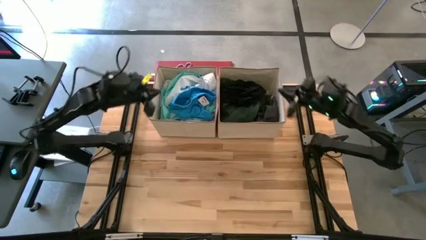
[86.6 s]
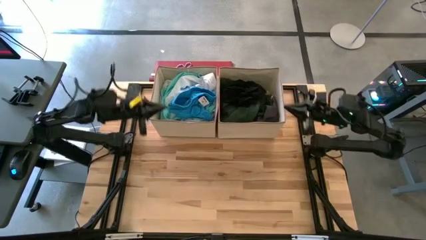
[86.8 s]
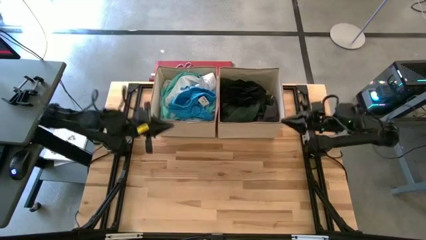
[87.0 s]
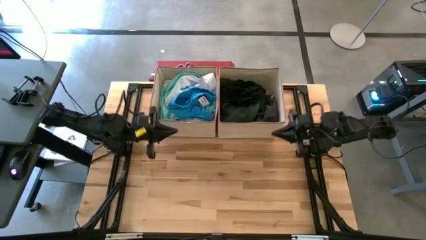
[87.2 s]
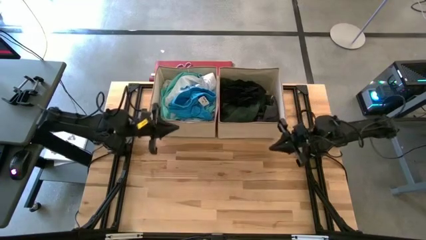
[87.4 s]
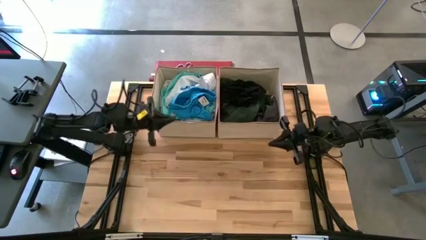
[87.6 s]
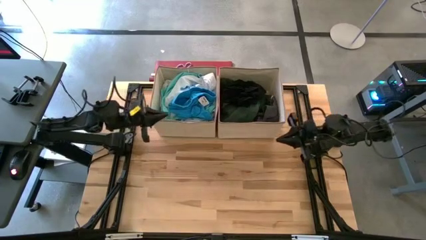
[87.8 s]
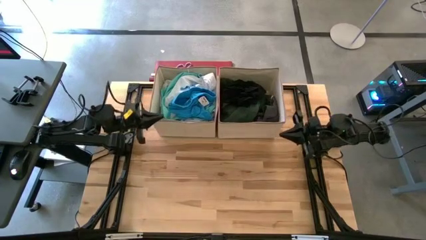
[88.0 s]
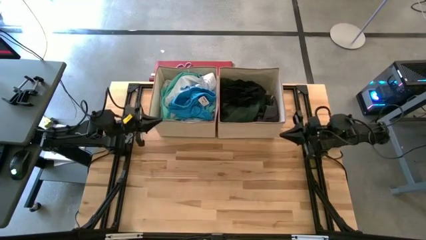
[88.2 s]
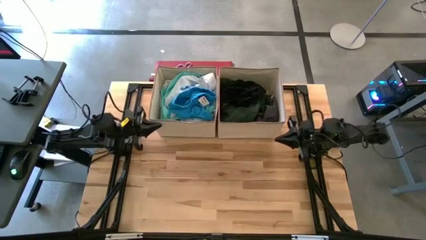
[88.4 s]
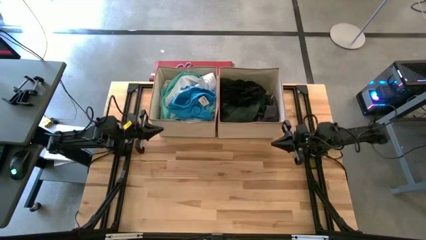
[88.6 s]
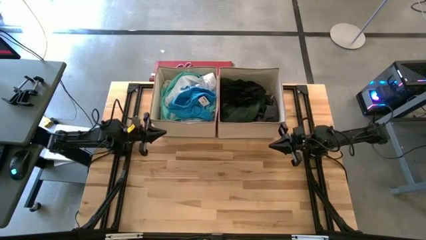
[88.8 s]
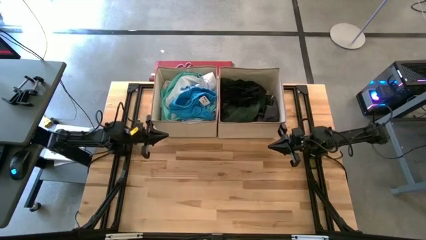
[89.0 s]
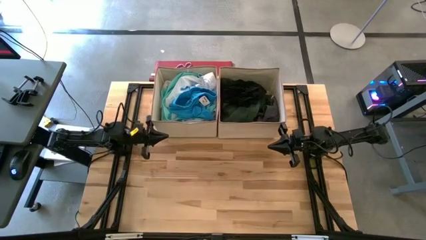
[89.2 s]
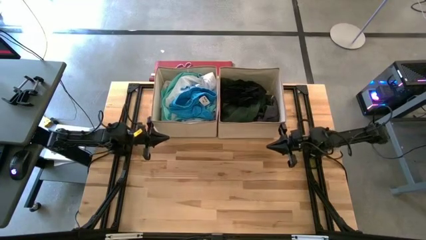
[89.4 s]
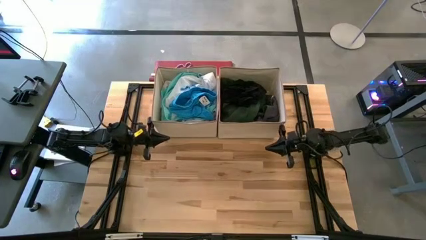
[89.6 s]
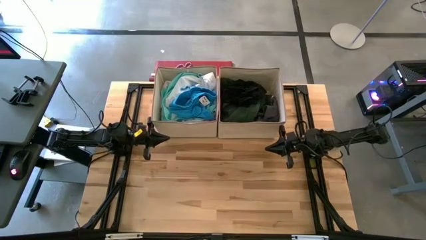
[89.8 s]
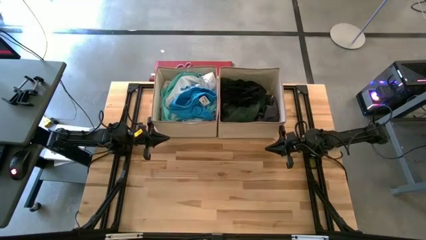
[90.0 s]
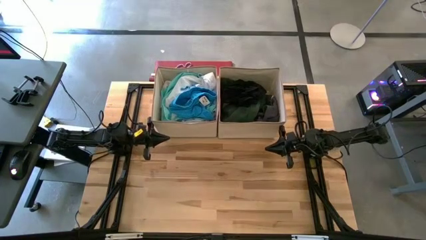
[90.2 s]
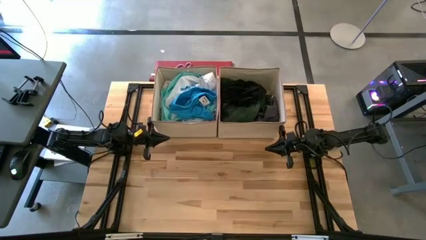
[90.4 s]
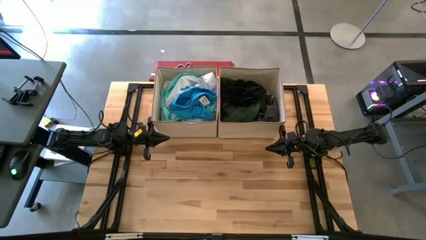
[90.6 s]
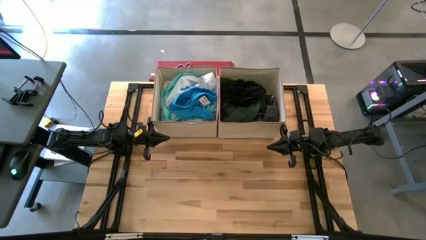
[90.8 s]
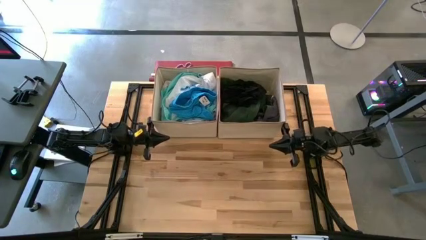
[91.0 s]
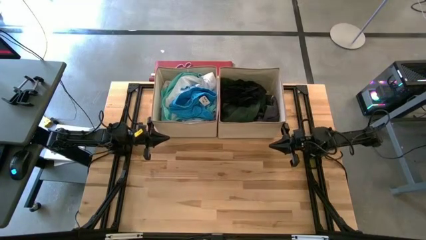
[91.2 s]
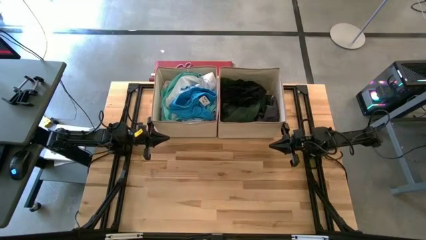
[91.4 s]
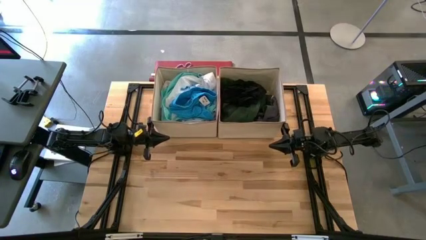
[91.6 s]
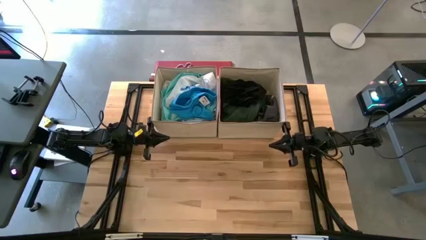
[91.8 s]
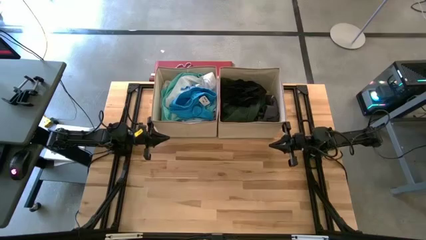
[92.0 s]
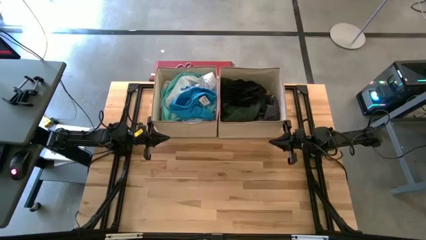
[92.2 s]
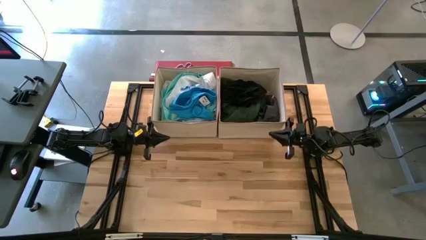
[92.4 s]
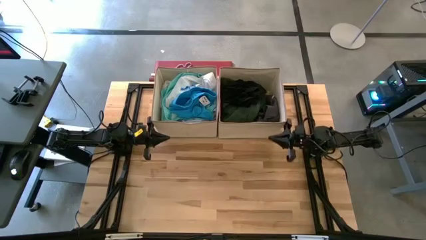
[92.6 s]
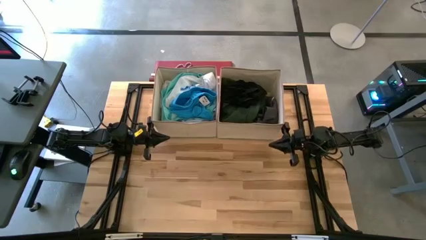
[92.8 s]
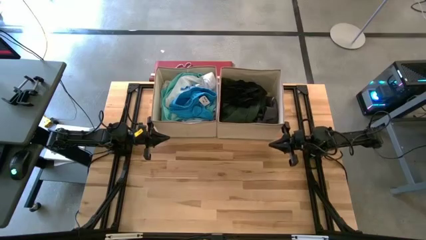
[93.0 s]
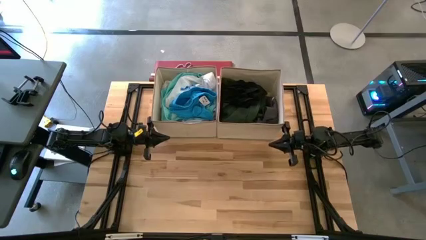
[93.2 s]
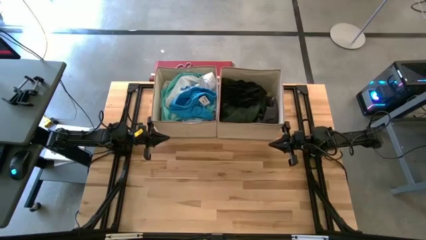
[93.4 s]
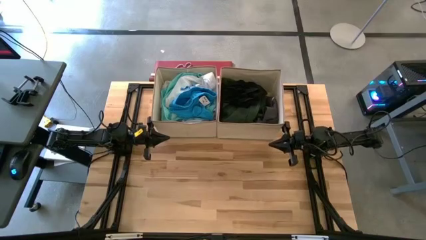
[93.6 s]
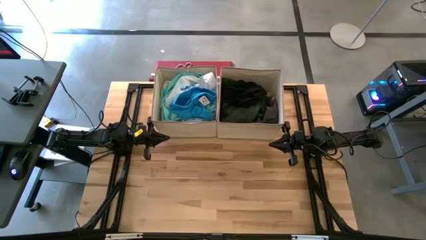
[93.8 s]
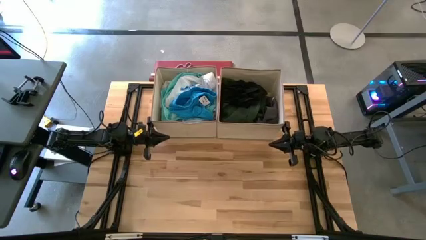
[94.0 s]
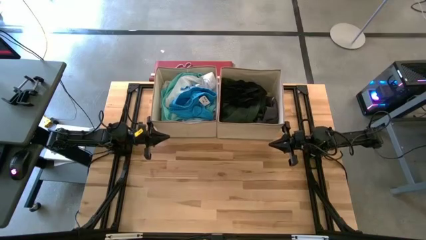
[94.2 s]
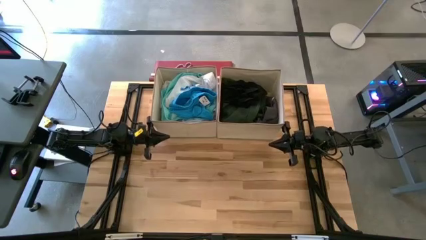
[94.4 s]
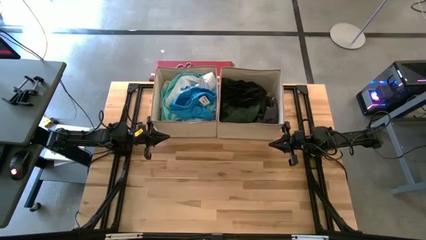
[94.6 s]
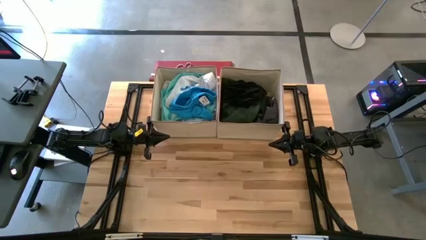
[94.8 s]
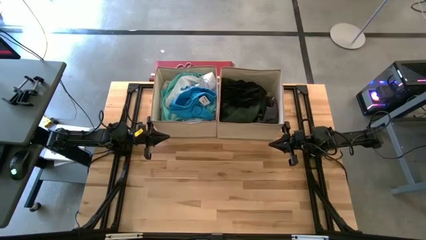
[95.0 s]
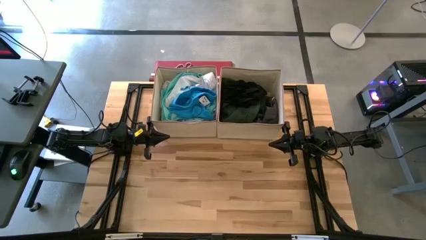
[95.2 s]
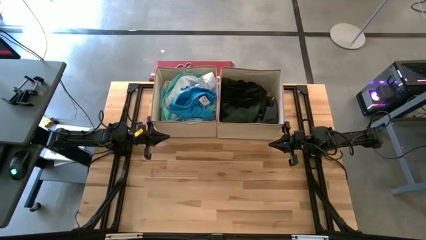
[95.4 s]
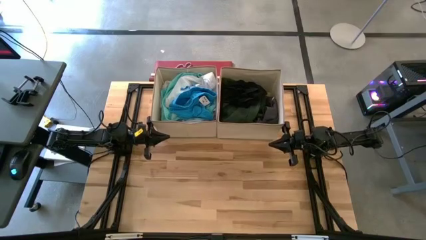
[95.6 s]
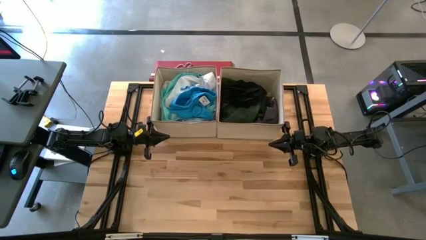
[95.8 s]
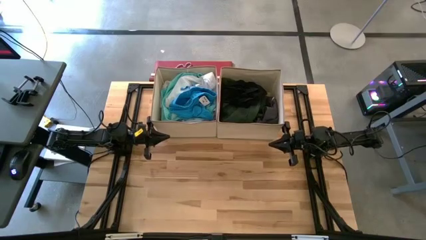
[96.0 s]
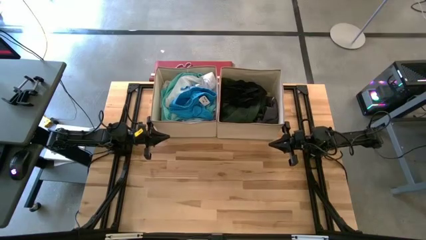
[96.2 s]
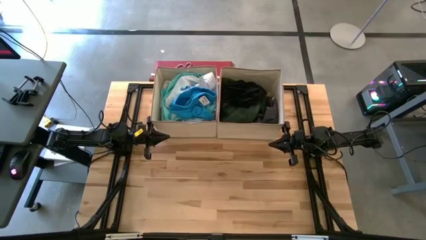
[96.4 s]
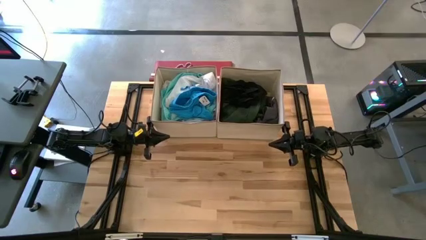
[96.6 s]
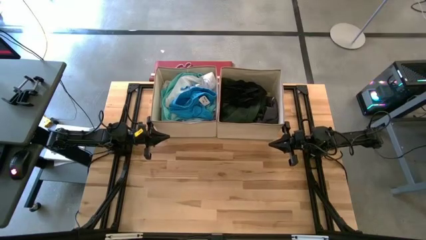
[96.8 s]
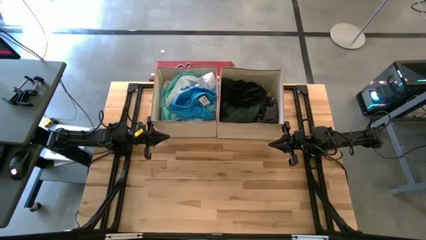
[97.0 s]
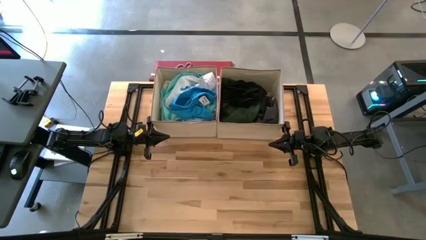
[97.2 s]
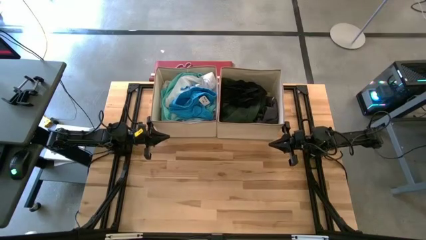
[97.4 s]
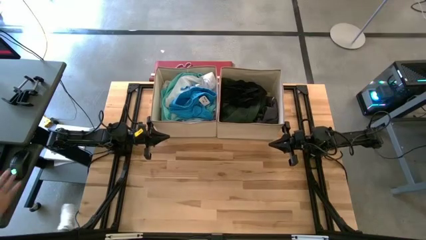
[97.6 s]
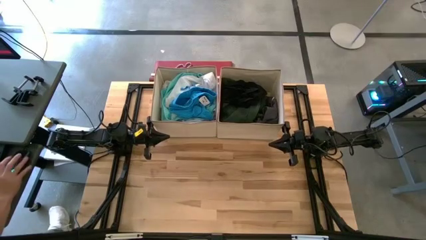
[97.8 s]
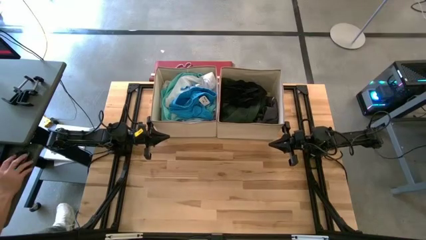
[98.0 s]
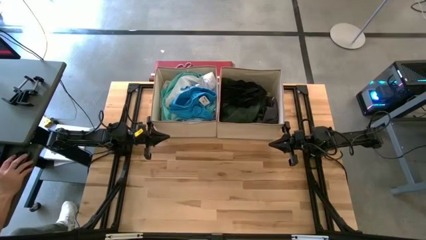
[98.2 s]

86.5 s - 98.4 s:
Task: Sort clothes
Return to Home Position

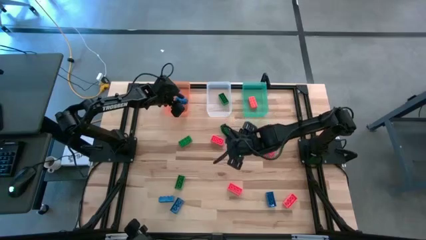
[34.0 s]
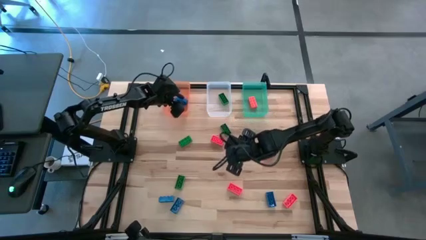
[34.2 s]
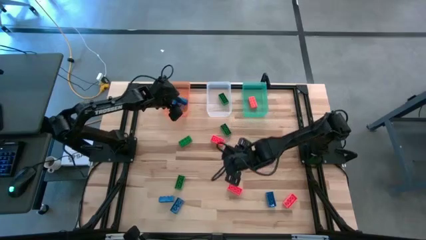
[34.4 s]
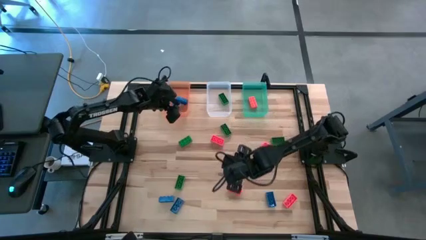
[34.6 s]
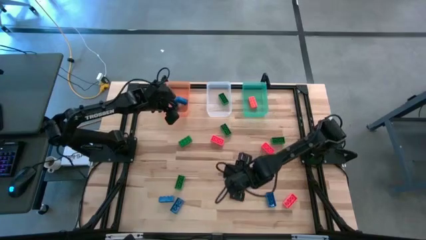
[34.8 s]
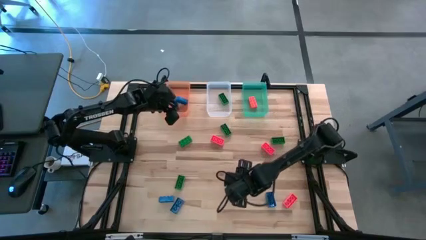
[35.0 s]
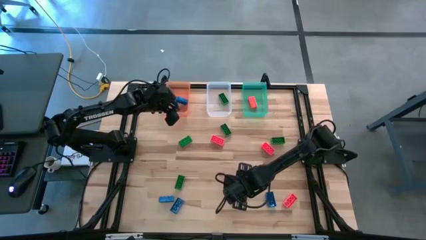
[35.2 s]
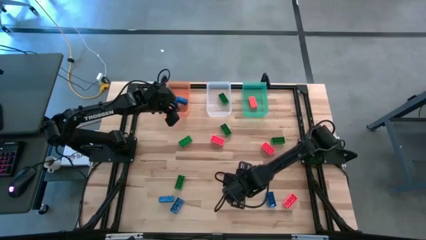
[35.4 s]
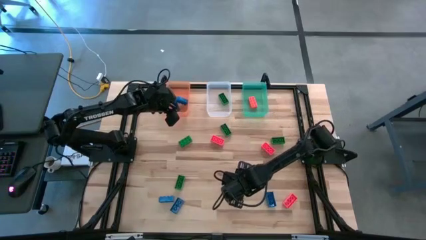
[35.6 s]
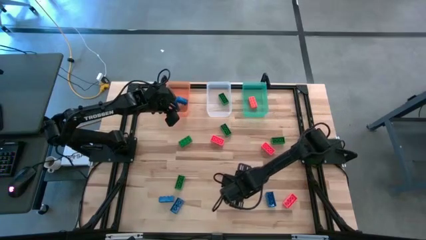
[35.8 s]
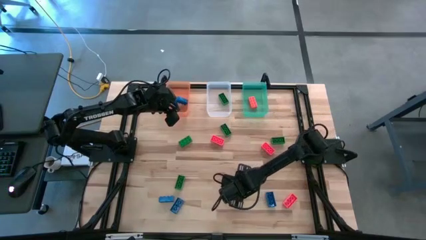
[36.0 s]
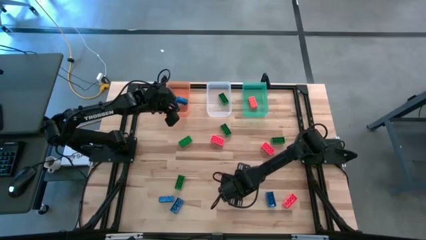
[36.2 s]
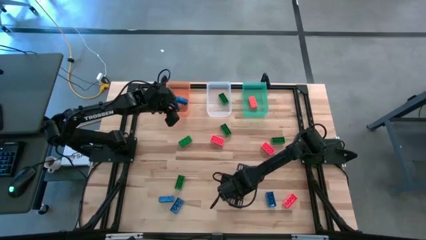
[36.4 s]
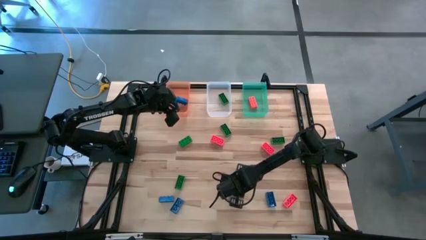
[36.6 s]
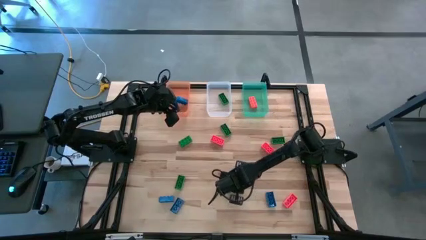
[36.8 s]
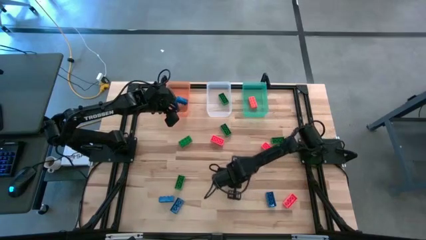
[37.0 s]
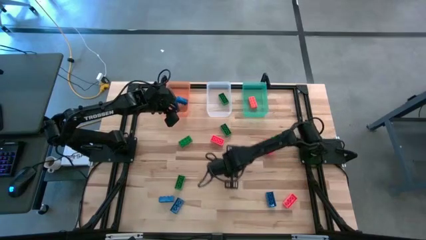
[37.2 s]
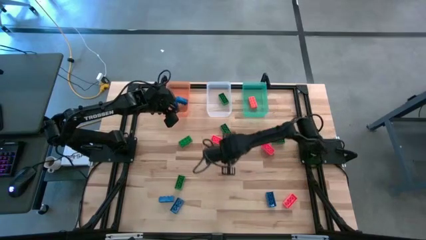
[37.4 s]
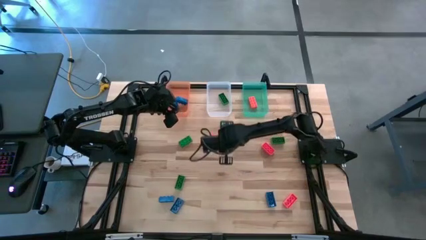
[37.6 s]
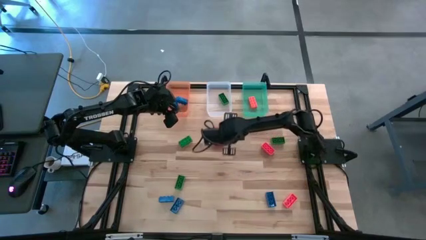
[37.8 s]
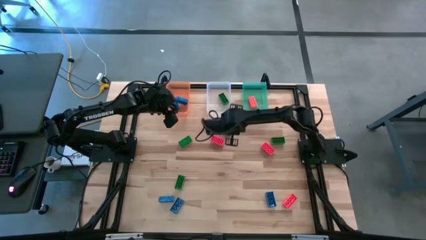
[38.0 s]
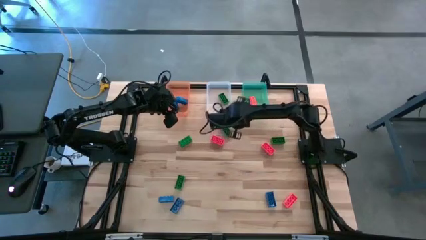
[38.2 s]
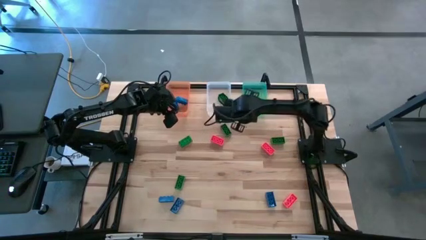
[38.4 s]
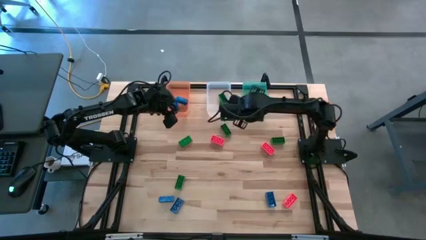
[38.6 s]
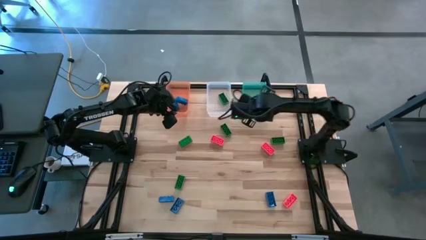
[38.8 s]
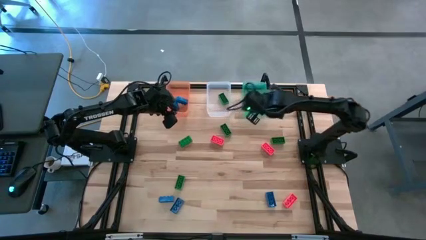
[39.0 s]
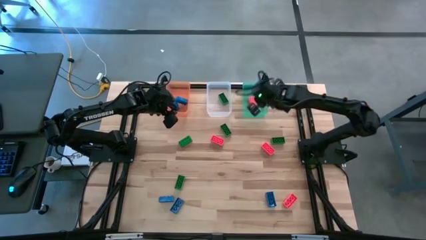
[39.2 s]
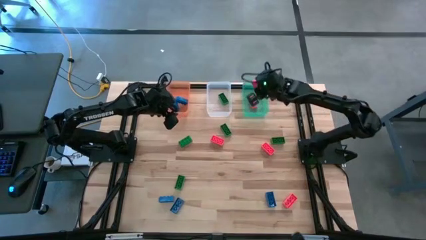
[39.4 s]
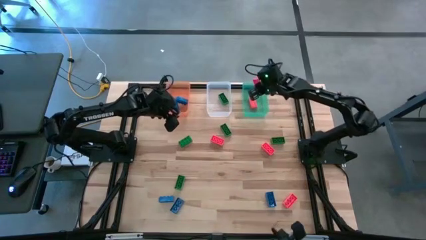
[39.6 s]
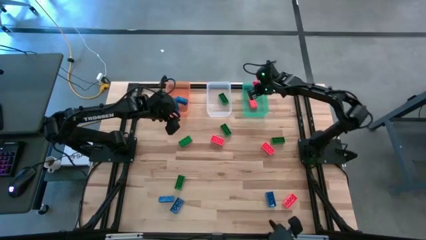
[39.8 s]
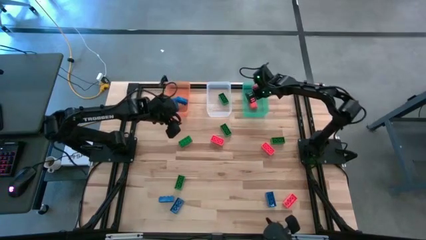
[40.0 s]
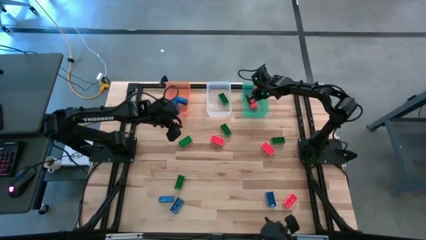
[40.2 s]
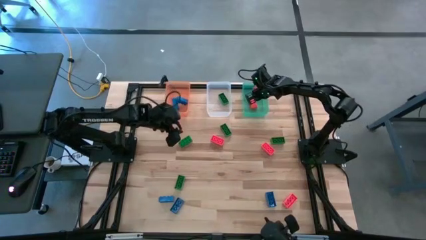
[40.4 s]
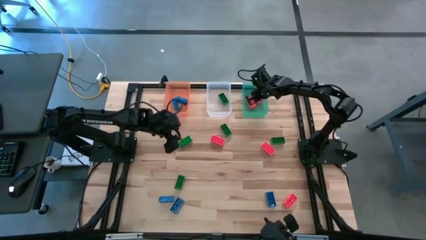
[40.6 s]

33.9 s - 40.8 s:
Task: Sort & place blocks by color
Put the orange game piece into the bin
